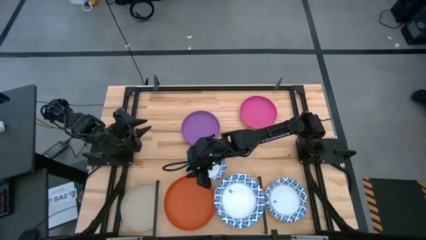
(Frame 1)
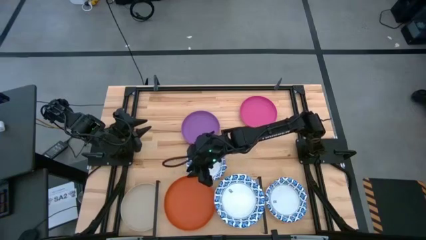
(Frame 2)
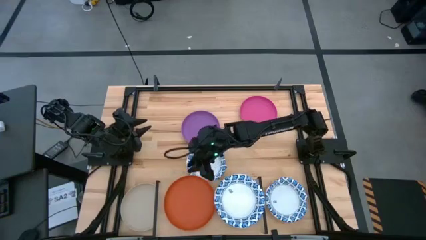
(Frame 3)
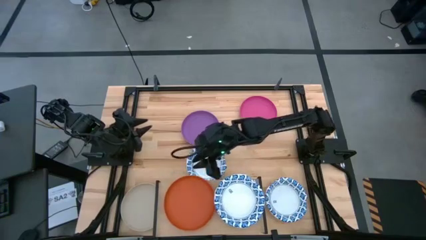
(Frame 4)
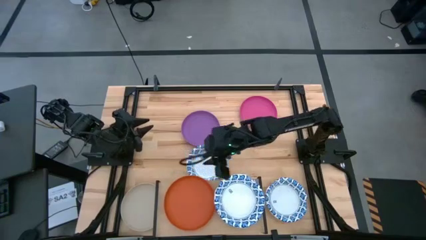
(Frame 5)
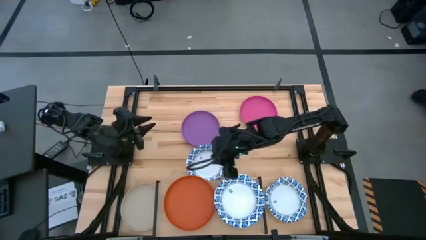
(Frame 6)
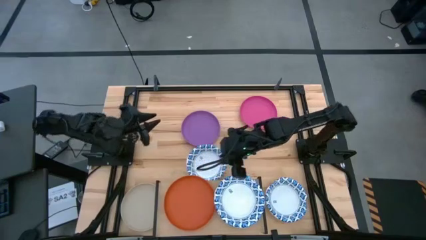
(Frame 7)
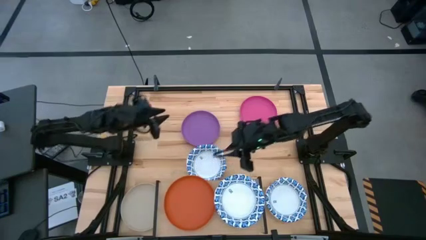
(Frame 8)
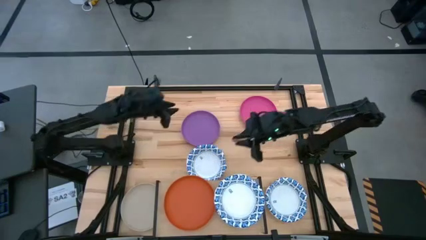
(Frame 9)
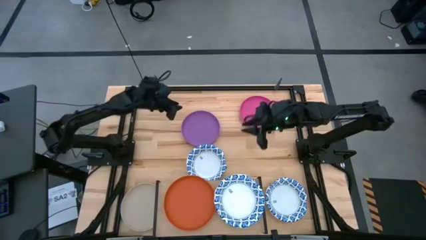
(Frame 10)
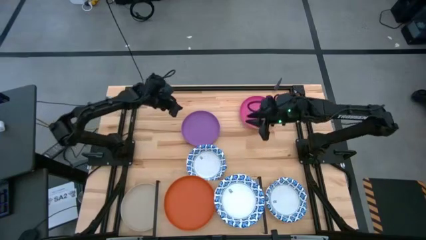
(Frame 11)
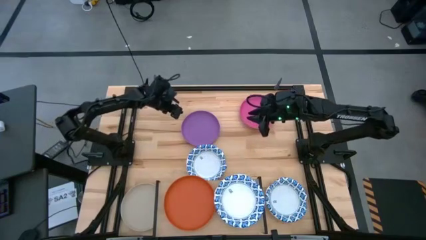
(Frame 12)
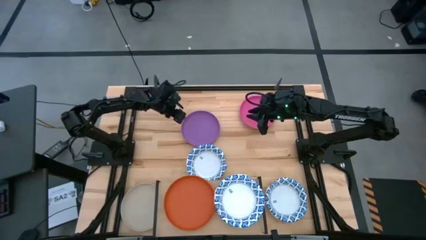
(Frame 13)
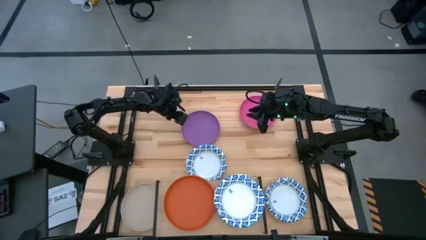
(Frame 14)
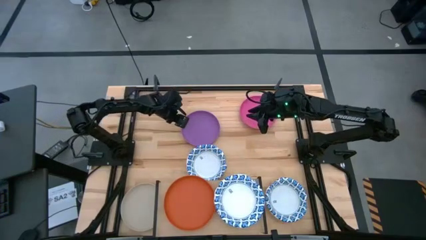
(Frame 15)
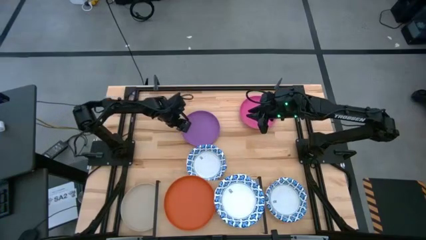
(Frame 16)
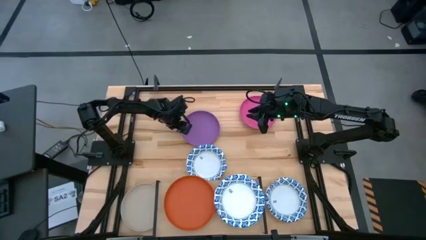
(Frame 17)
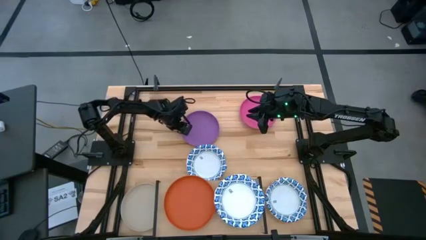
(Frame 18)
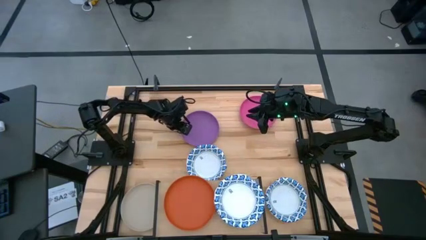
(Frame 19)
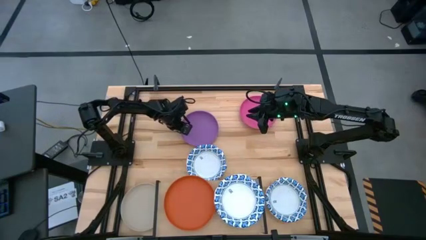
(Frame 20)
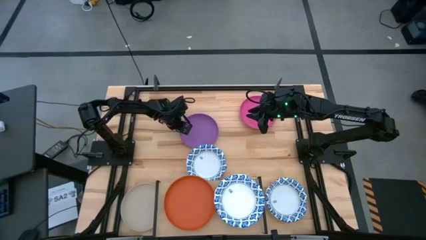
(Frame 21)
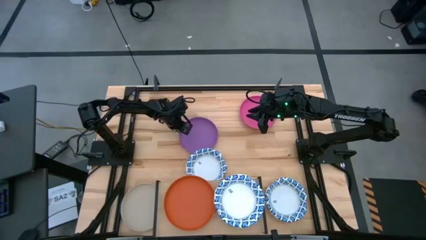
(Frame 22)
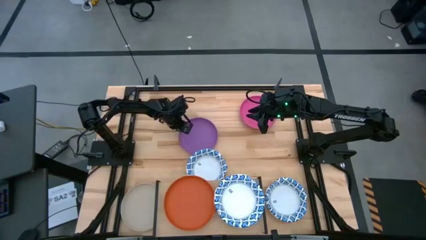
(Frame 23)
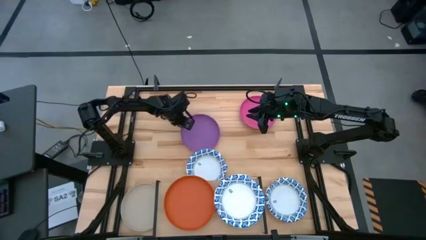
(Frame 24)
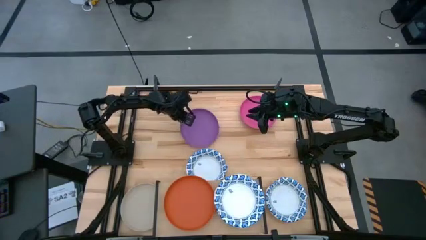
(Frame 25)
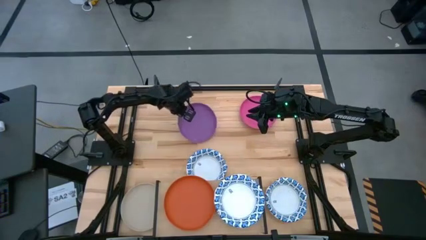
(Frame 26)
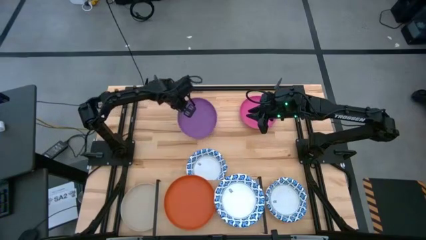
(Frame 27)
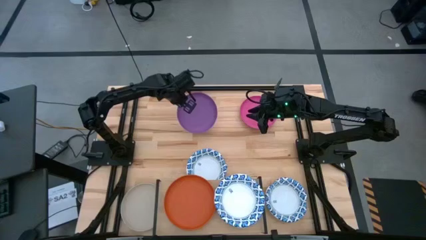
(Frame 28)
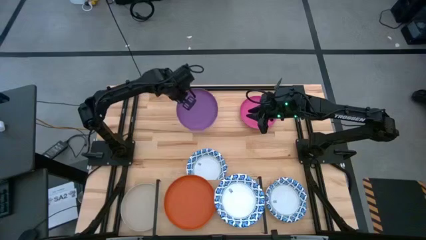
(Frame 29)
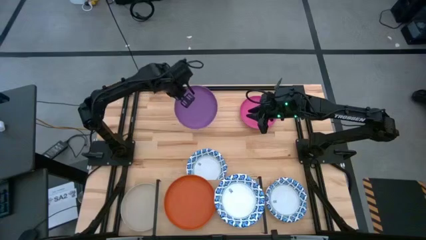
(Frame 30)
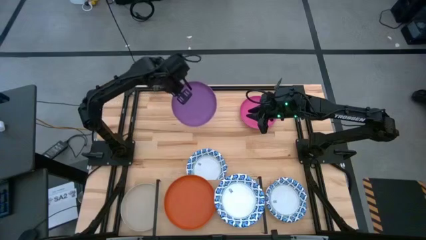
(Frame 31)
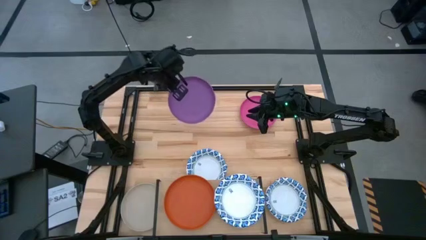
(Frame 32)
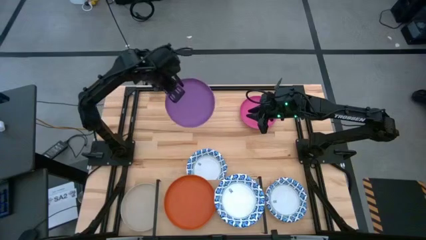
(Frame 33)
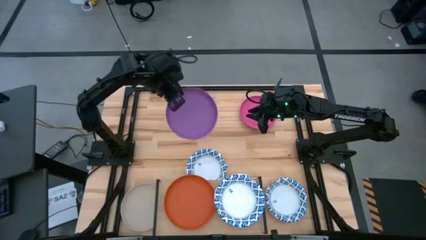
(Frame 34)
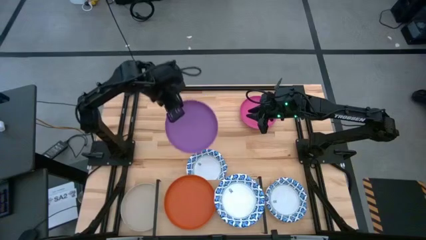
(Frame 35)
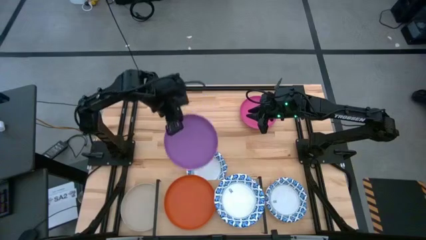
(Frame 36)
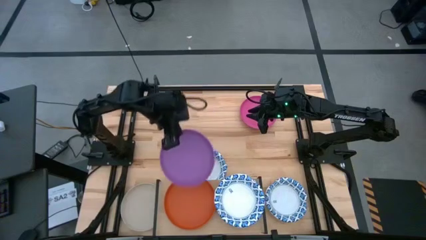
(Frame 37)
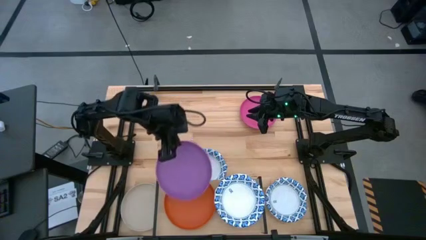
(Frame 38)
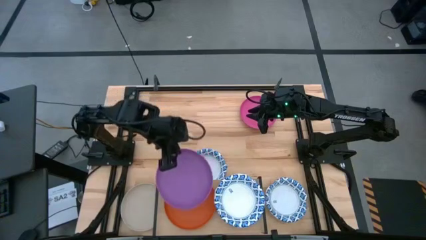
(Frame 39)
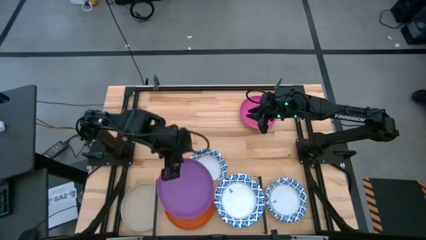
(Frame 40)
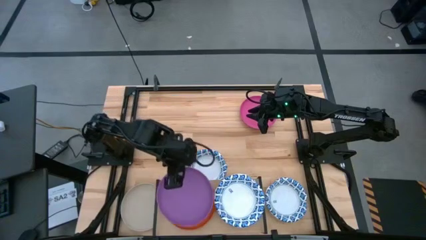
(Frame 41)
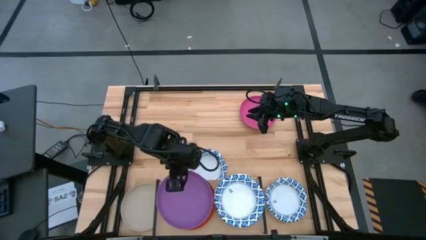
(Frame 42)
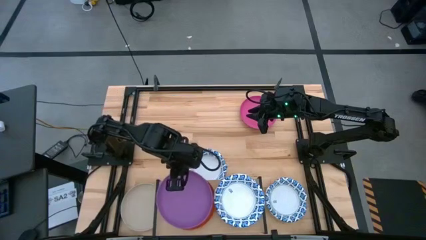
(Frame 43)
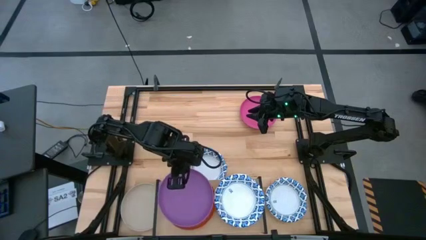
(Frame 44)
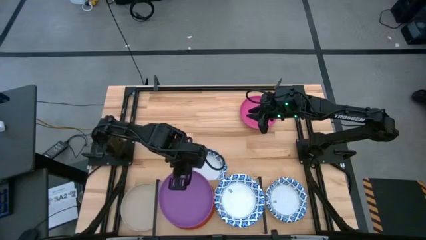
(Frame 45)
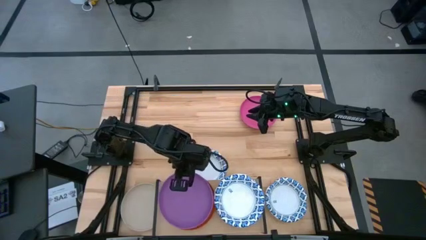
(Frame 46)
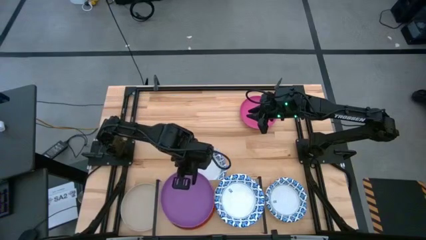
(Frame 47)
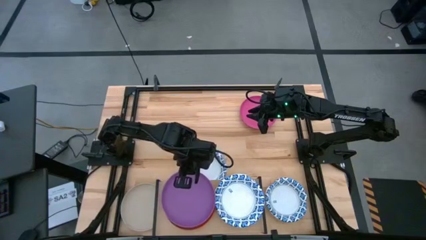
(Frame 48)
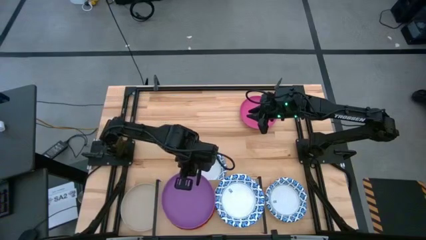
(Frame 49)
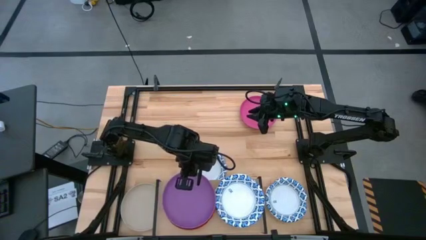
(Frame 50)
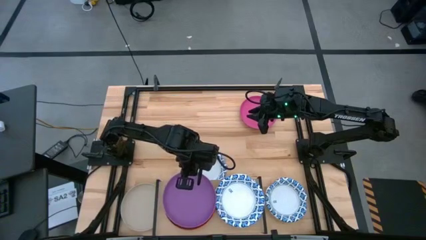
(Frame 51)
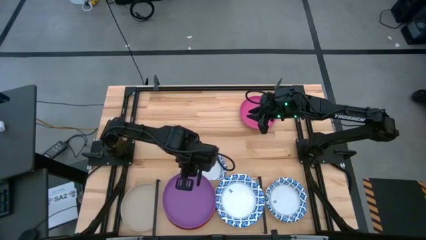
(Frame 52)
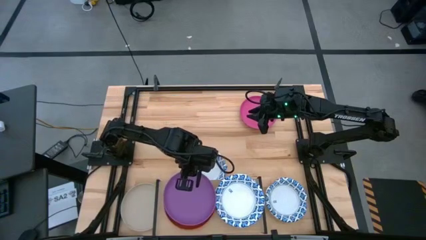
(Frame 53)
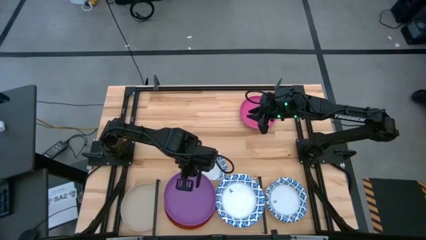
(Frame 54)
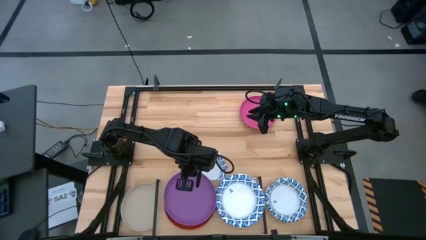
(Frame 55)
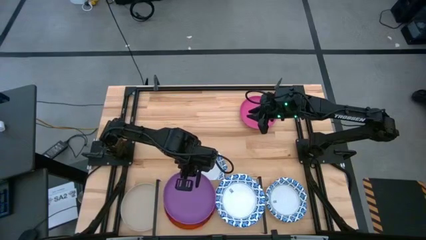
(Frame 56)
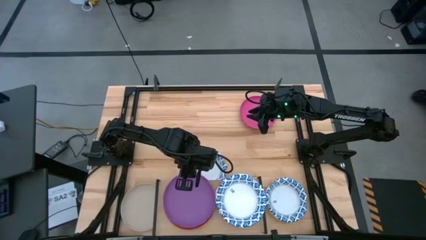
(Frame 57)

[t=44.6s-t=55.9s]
Task: Place and stack plates onto a shelf
Stack the purple plate on top of the orange plate on the shelf

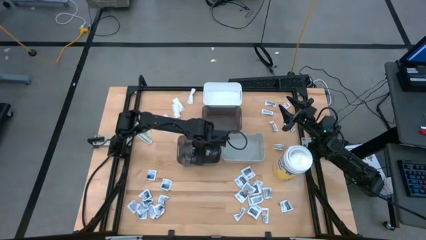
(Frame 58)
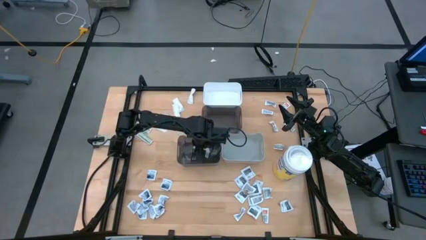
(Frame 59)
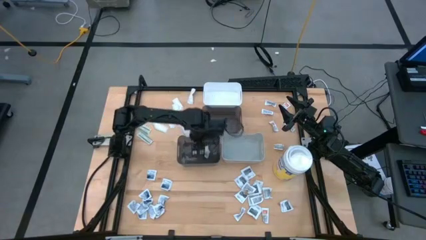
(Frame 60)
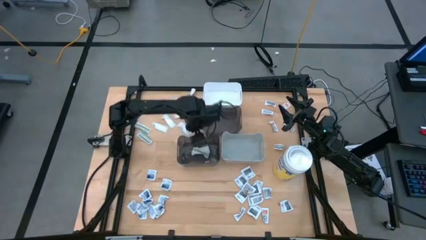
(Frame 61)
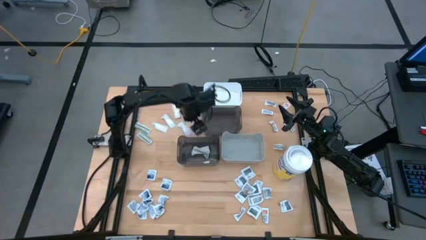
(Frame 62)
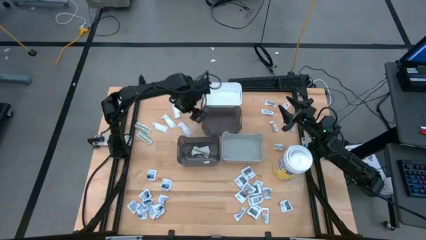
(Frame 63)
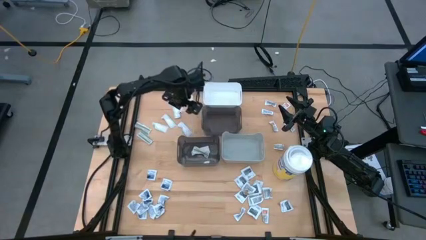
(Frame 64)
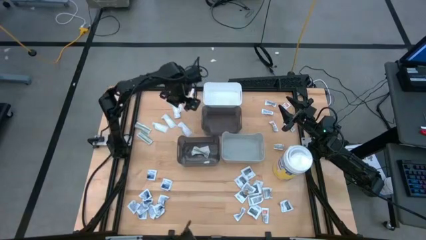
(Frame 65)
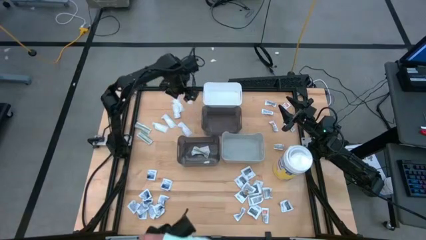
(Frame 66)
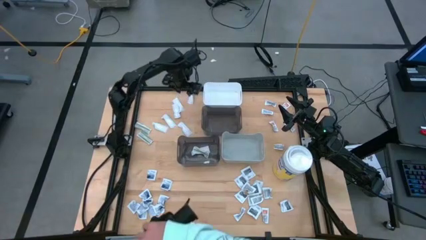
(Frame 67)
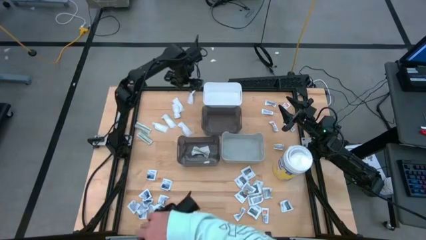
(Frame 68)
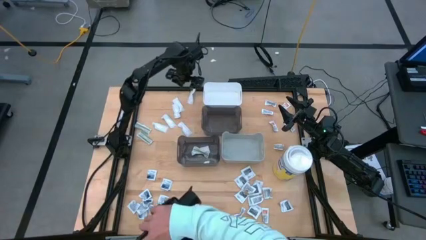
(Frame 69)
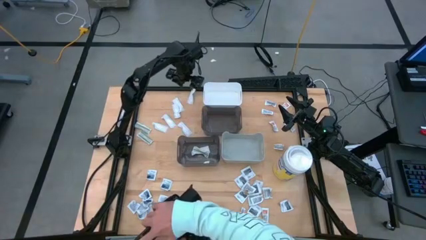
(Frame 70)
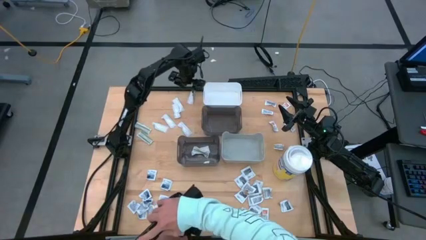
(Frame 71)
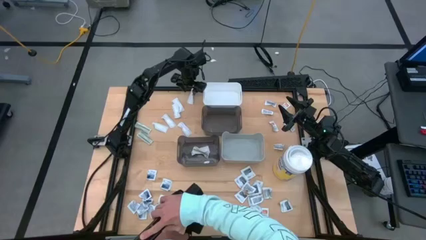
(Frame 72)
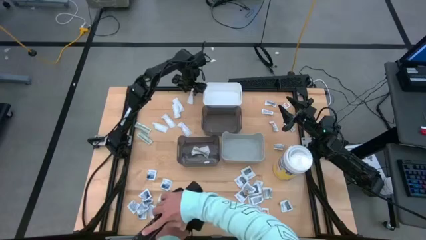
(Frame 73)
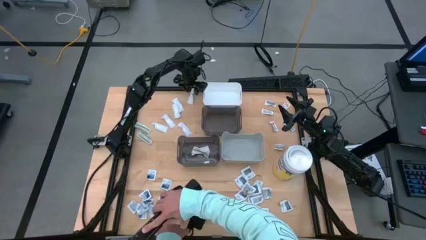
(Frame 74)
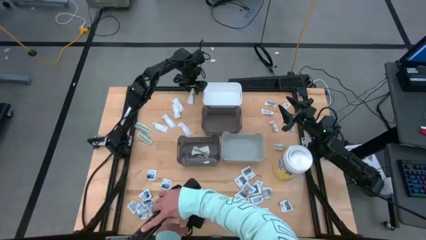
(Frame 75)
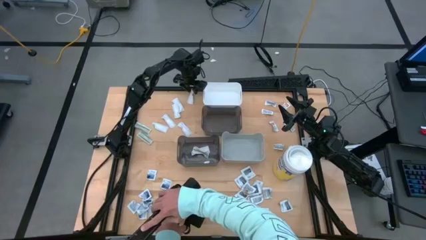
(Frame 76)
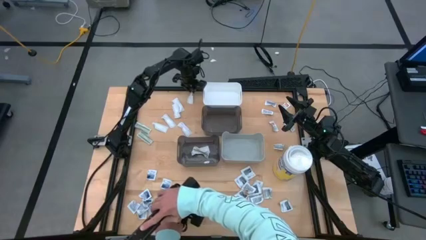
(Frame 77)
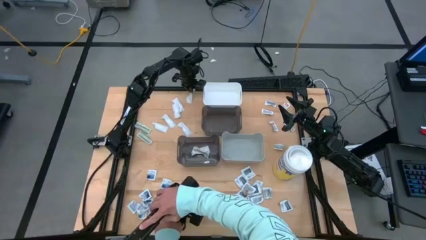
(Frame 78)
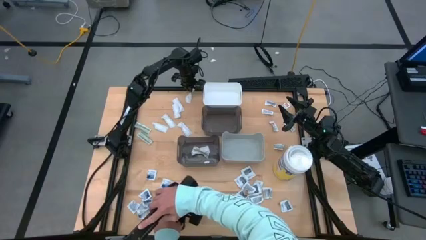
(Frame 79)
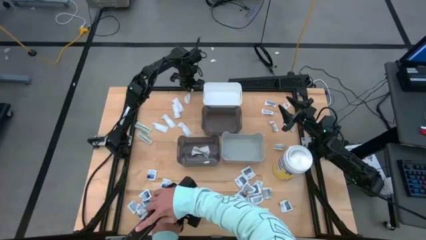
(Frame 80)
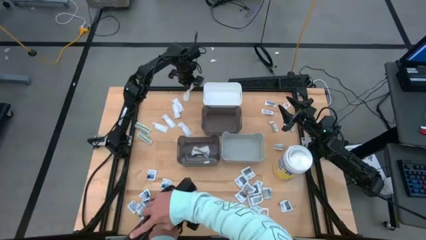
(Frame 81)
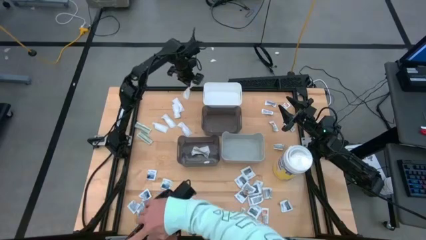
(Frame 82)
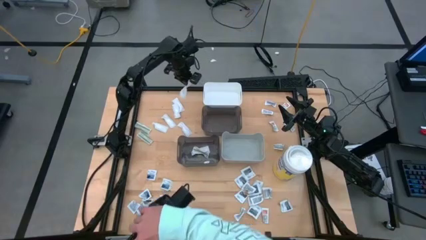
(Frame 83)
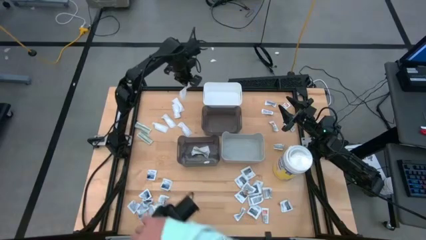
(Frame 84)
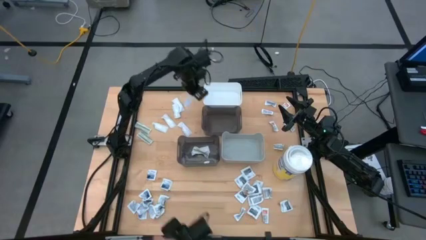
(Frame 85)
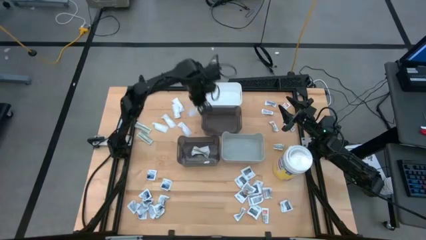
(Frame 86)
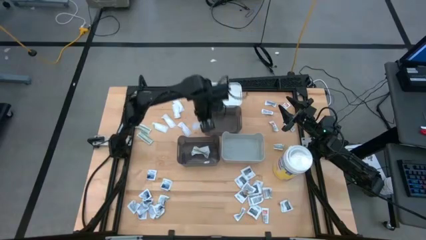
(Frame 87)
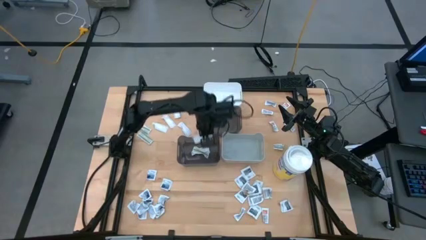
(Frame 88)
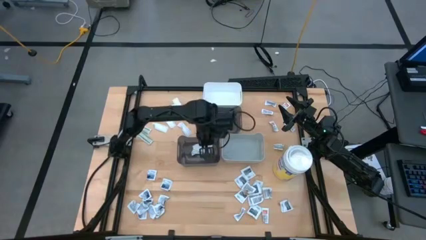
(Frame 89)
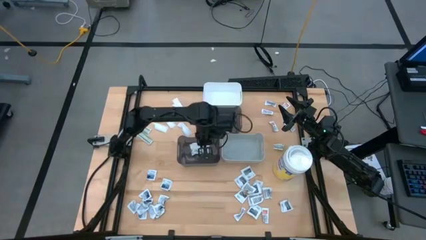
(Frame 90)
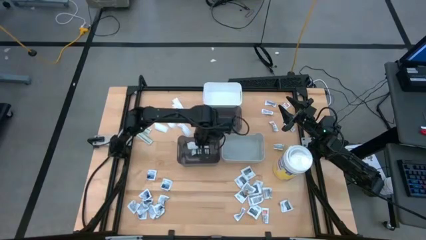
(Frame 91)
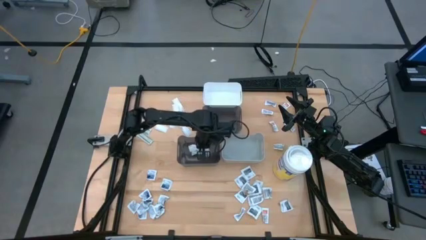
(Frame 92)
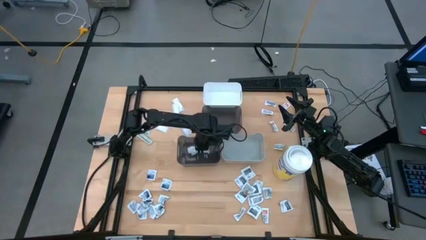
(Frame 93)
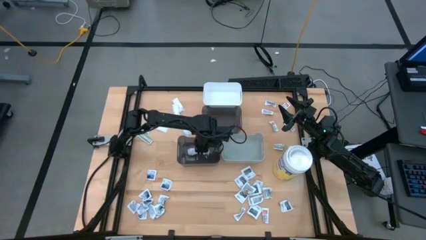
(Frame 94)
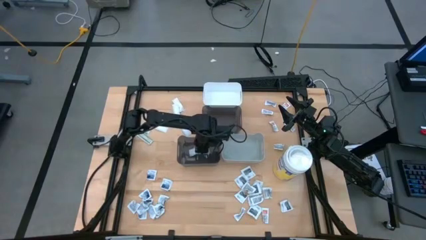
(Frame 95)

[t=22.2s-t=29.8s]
Task: Pick & Place First Aid Supplies
Put the white bandage into the bottom black bin
